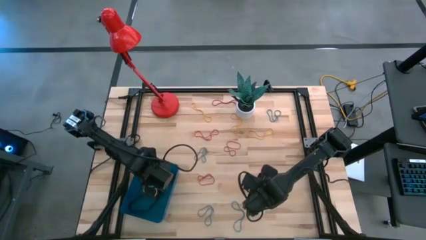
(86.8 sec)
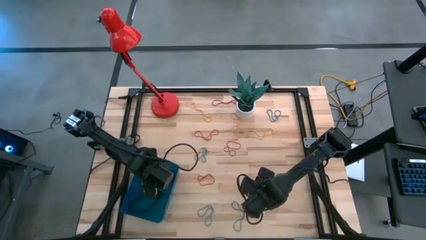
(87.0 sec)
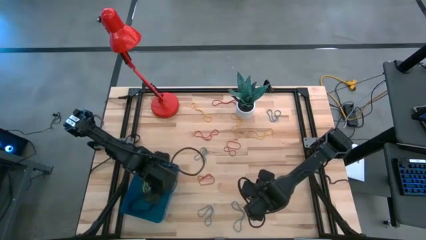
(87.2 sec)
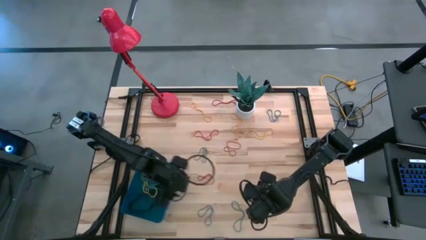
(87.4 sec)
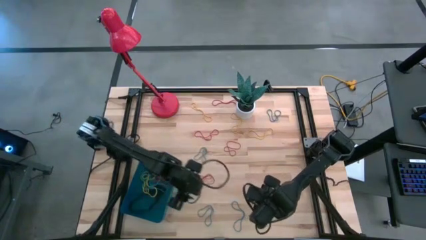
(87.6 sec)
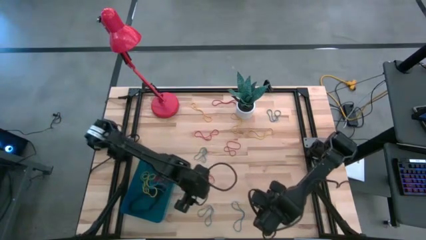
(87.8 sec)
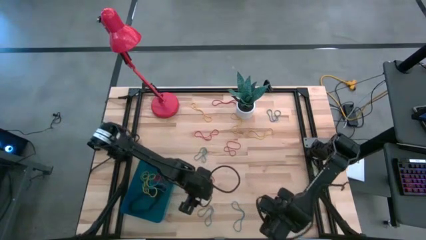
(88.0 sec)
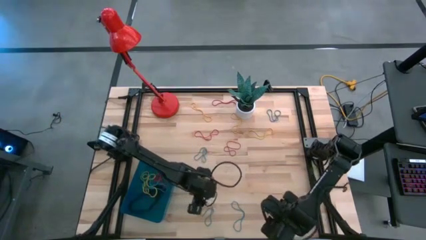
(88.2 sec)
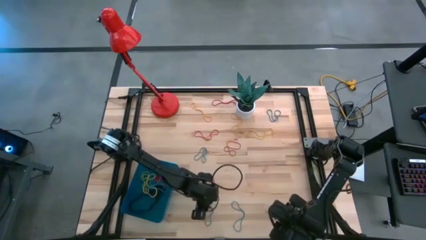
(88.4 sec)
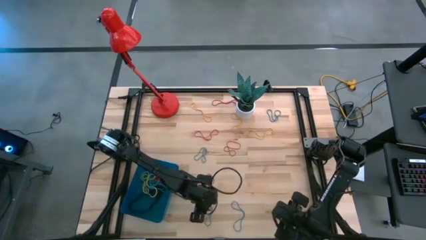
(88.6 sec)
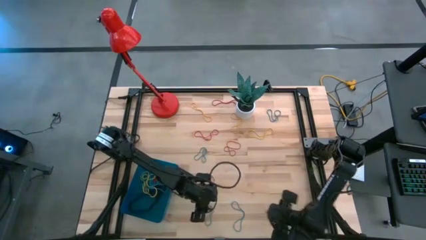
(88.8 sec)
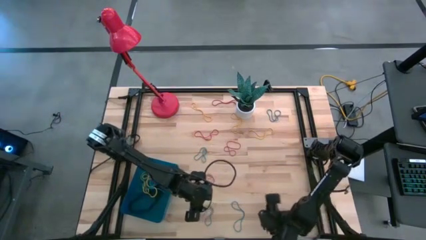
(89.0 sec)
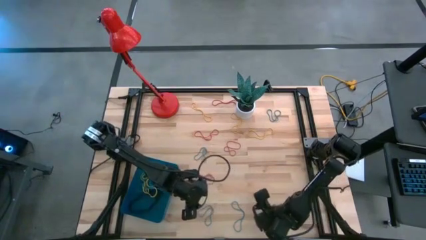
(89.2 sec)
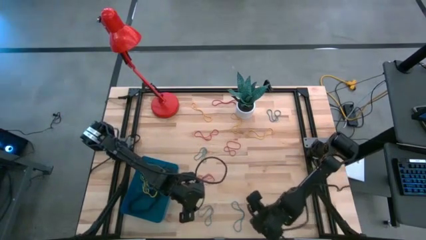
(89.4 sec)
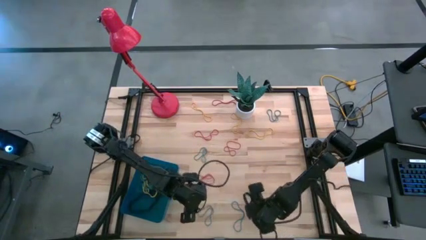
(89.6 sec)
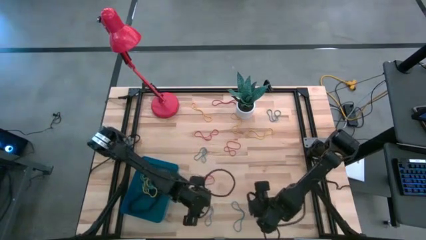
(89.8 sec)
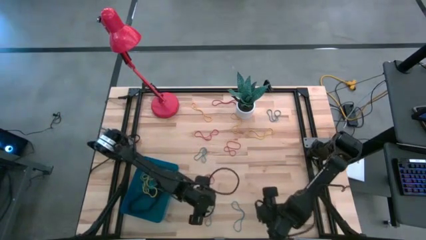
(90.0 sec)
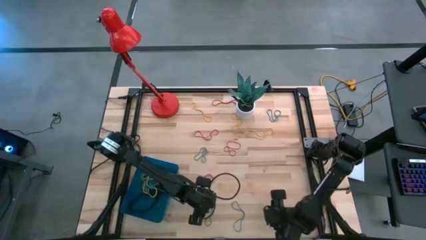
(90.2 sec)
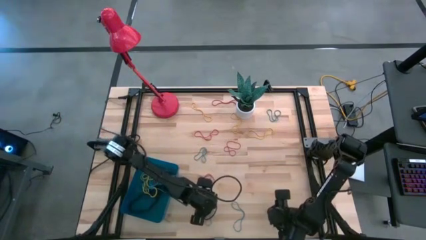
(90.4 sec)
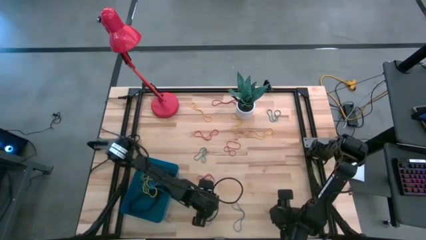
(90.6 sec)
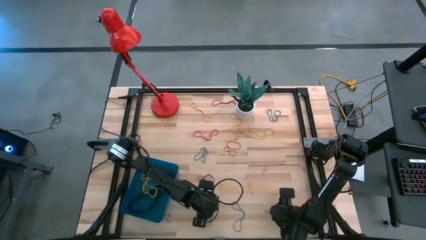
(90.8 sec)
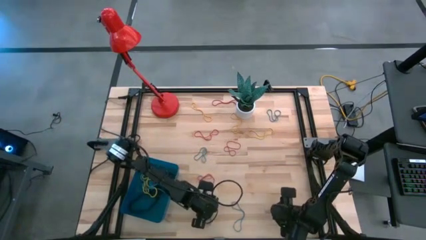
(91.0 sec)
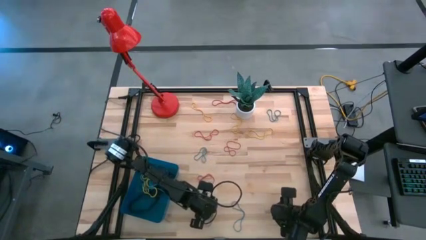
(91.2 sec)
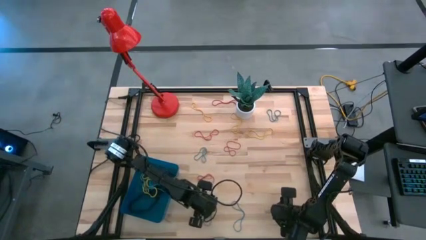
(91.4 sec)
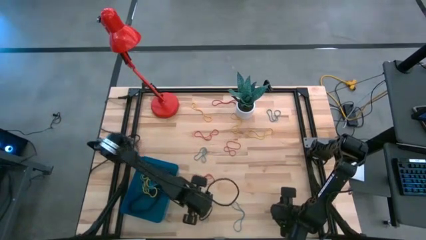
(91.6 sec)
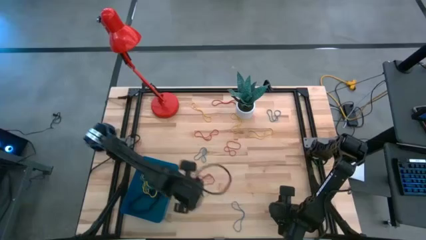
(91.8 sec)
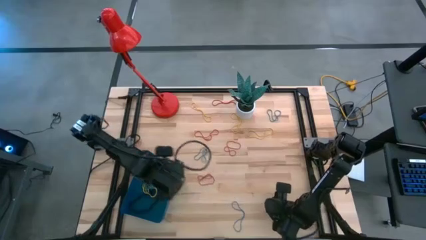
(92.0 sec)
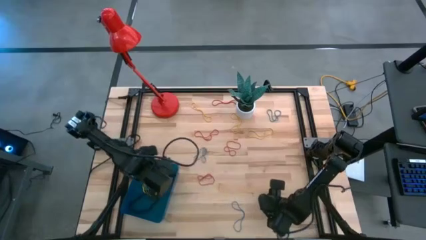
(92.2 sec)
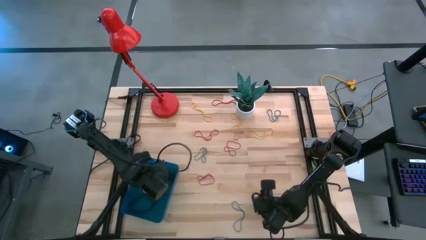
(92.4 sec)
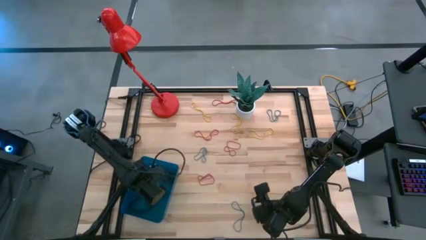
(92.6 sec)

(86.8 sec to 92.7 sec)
Task: Pick and place rubber bands into bin
Put the blue rubber band into blue bin

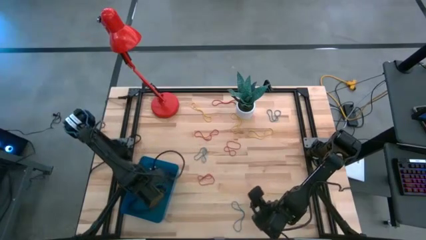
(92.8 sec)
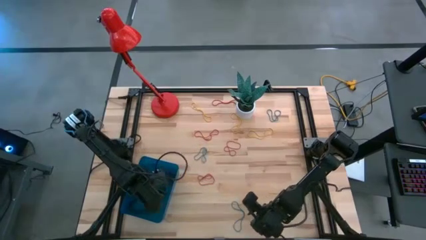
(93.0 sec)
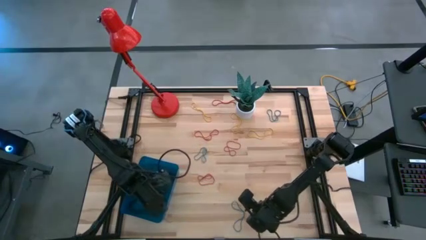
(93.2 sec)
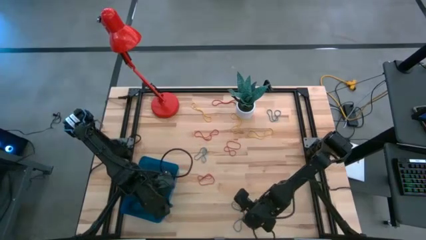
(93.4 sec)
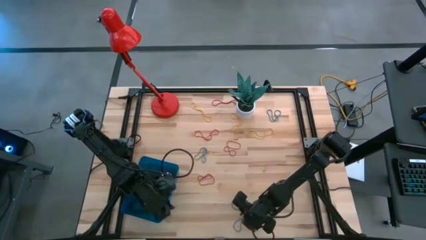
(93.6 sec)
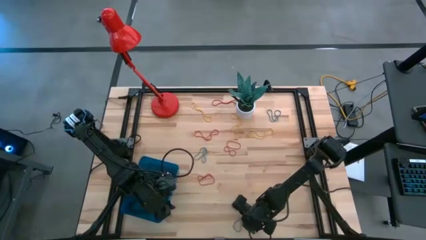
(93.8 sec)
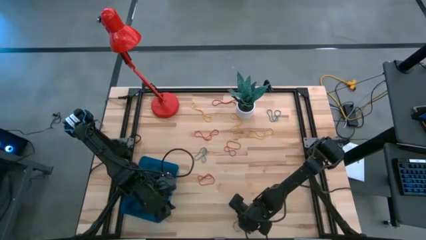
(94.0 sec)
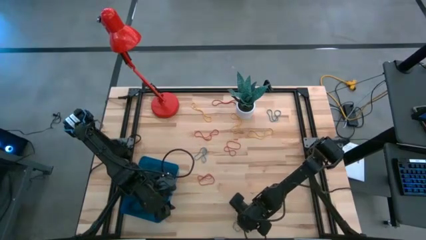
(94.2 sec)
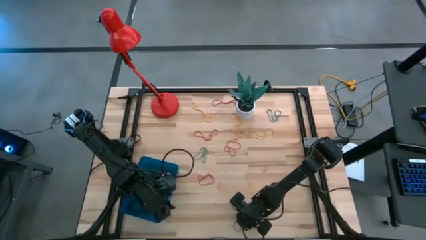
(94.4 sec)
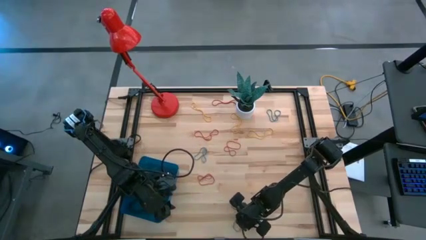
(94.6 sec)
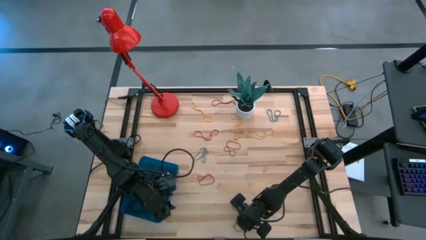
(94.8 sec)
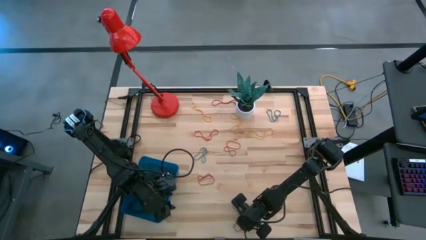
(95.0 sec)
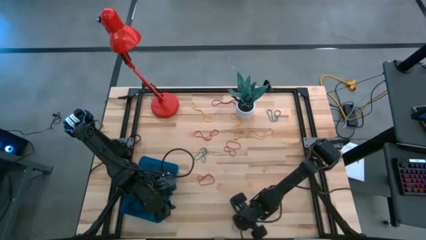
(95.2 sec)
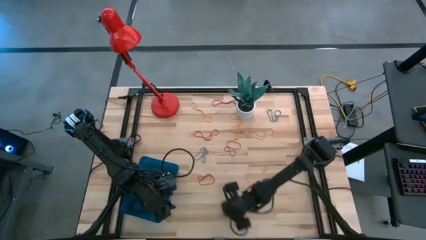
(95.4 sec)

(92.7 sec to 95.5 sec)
Put the blue rubber band into the blue bin

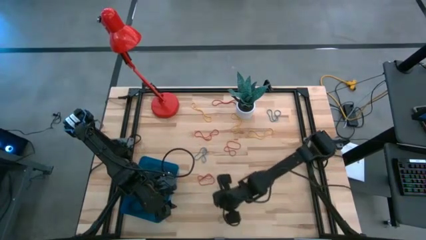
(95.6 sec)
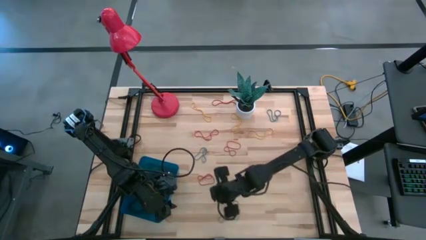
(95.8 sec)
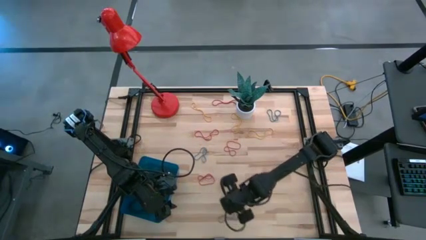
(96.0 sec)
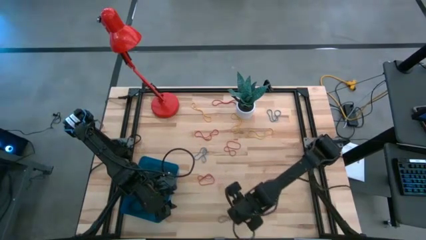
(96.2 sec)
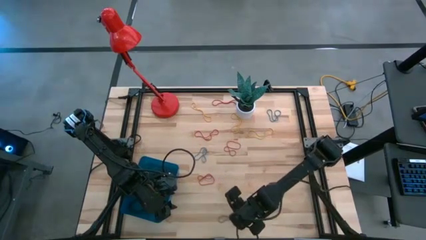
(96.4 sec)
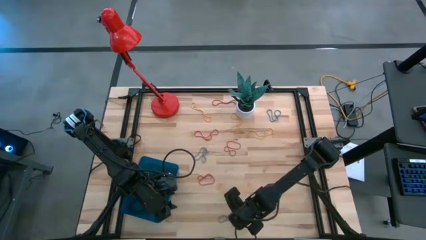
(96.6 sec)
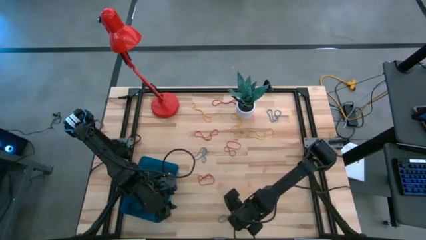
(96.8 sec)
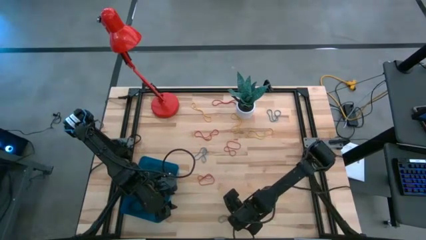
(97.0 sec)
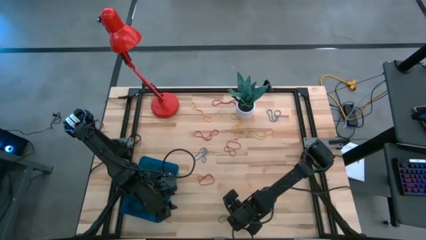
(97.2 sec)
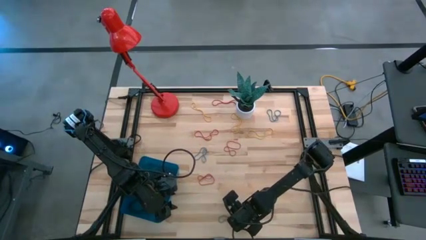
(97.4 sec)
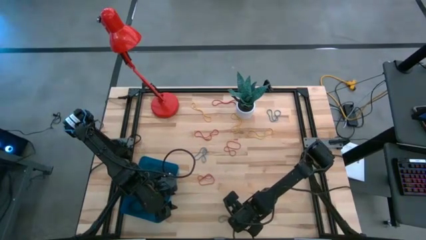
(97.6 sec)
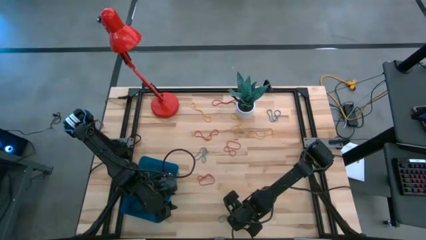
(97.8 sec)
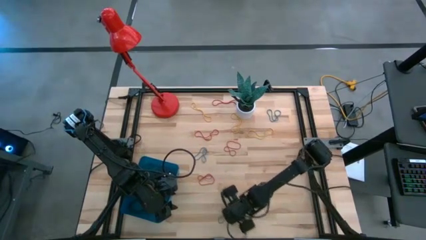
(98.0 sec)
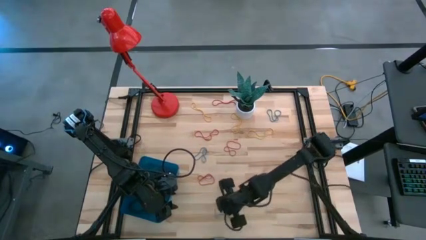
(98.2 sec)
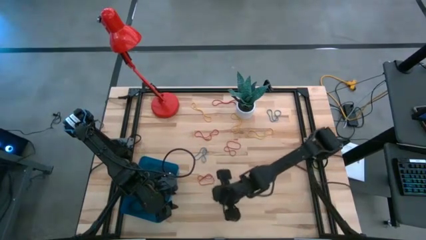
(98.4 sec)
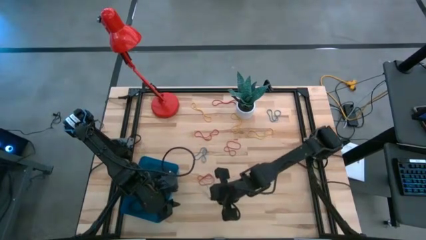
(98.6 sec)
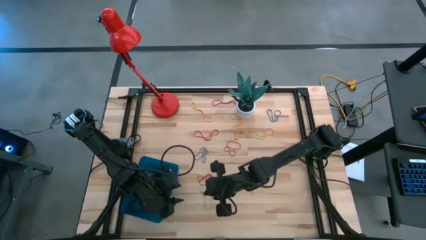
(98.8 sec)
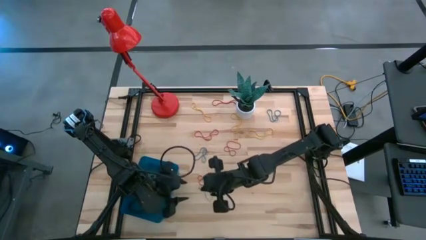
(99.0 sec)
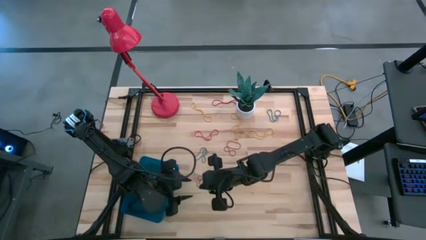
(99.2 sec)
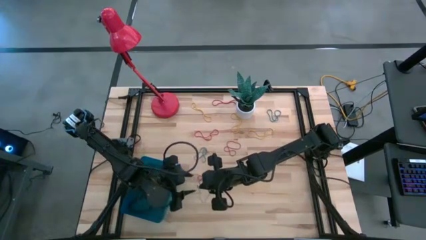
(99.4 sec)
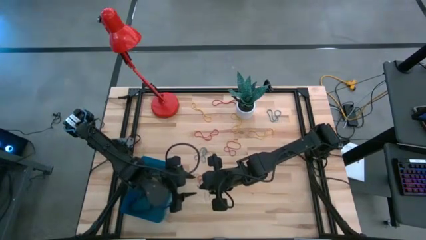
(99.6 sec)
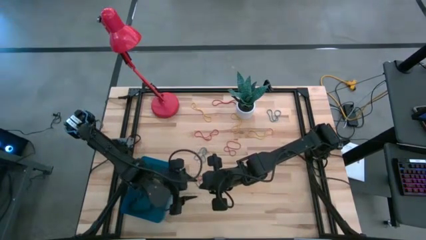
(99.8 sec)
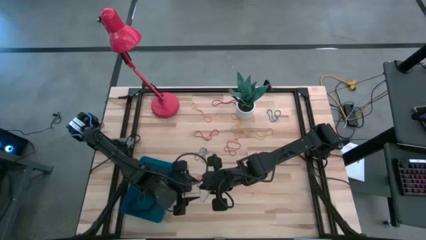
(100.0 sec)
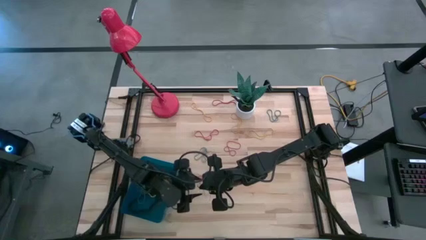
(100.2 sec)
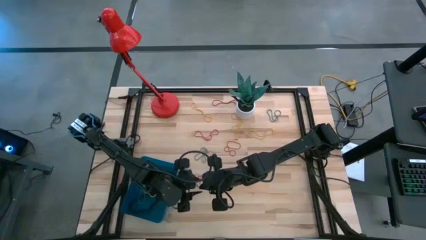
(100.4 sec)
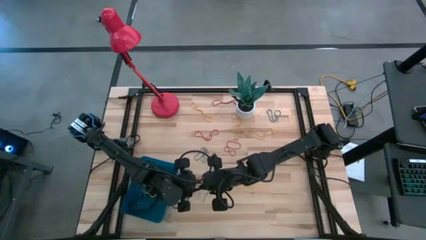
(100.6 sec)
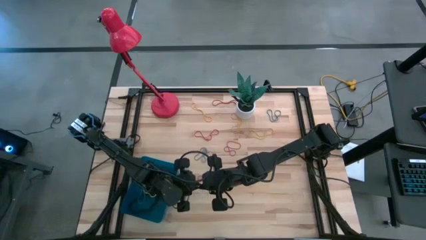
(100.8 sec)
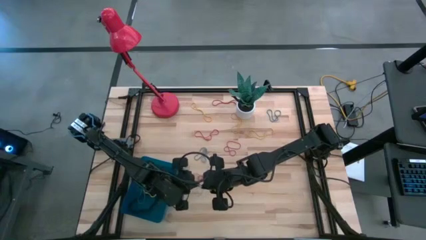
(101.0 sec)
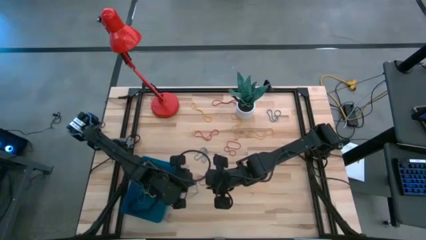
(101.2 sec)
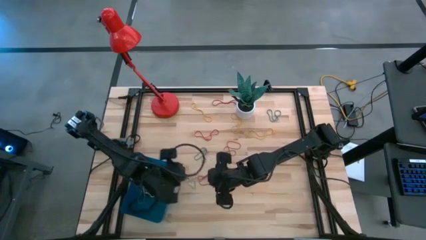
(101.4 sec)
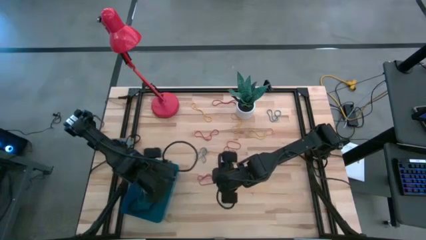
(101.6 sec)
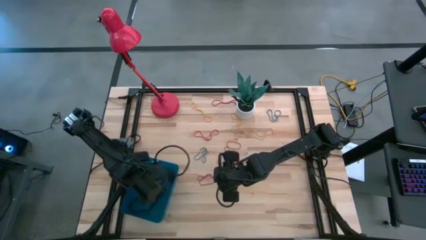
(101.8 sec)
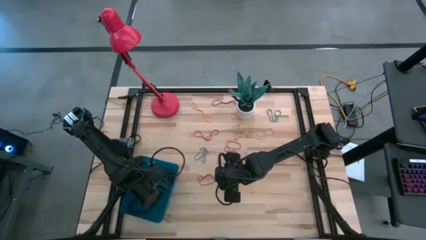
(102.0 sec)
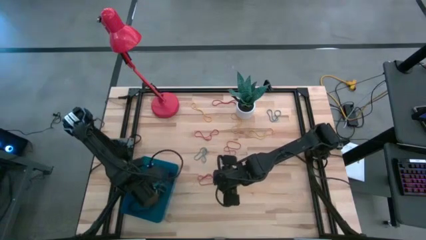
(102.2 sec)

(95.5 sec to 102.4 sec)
Put the blue rubber band into the blue bin
